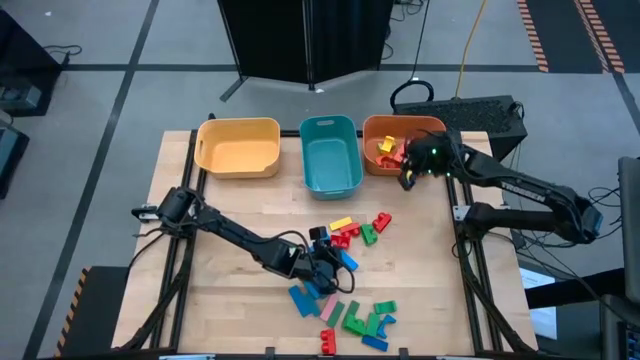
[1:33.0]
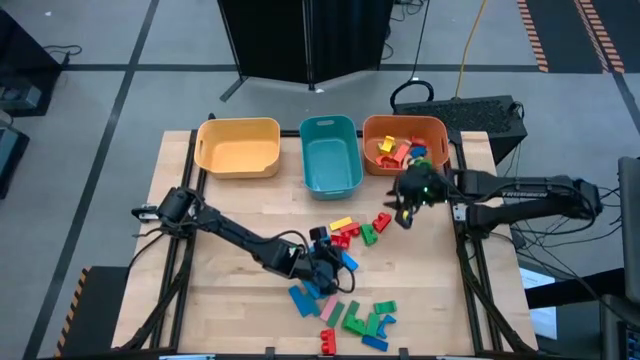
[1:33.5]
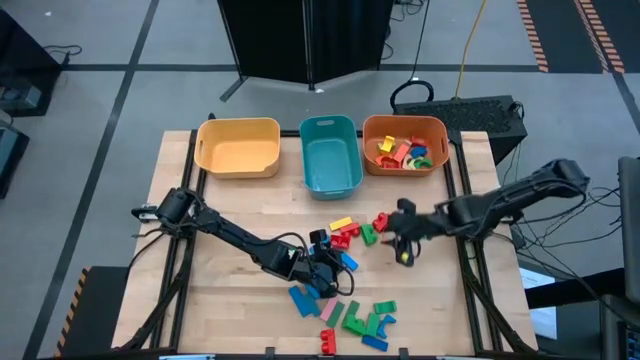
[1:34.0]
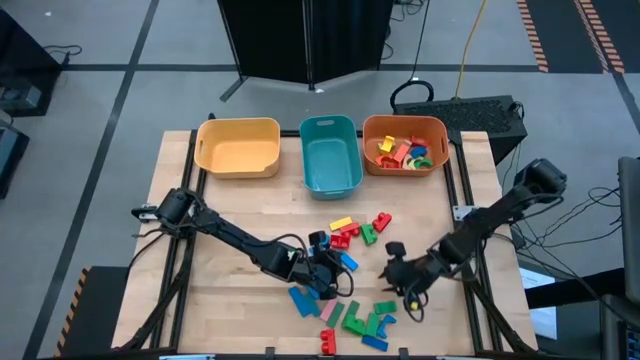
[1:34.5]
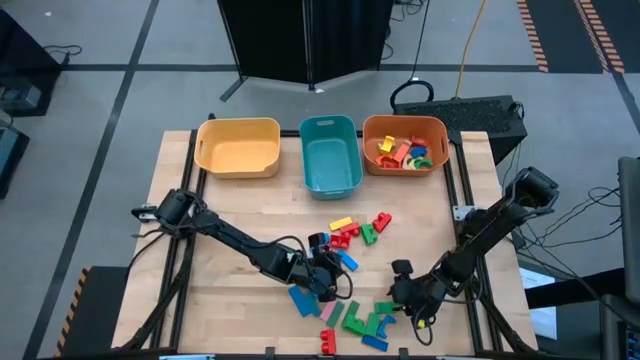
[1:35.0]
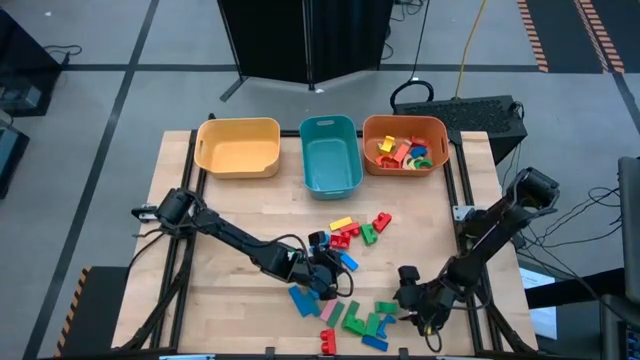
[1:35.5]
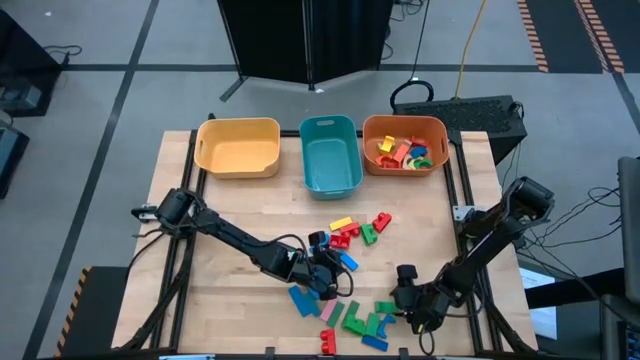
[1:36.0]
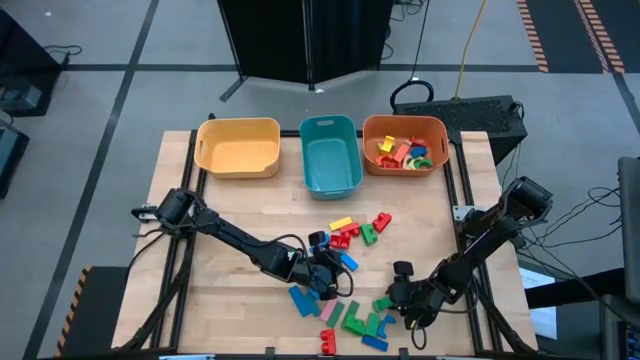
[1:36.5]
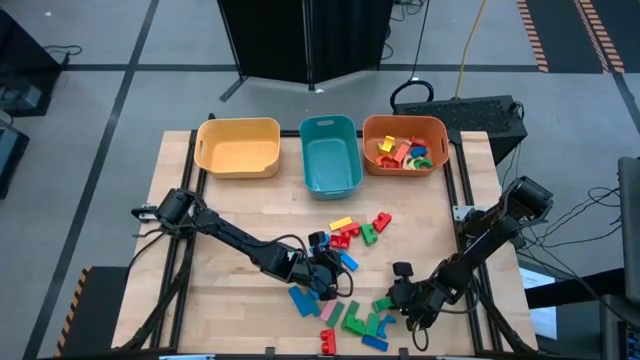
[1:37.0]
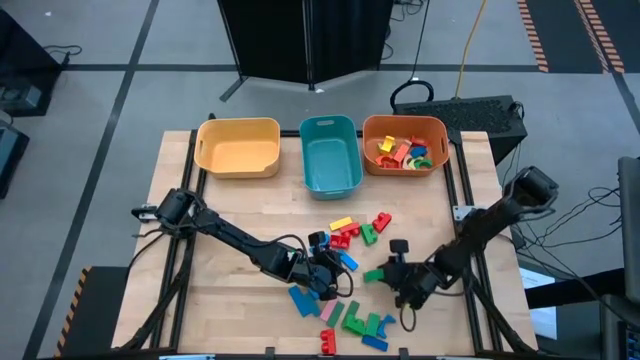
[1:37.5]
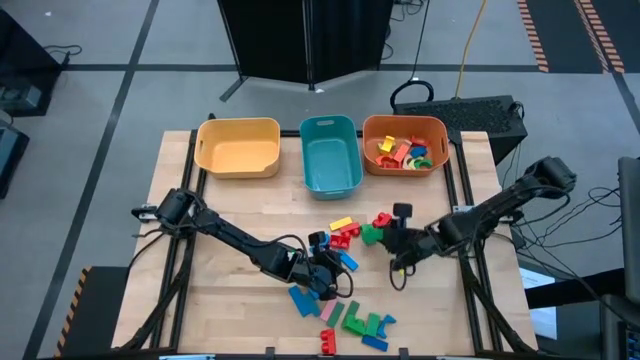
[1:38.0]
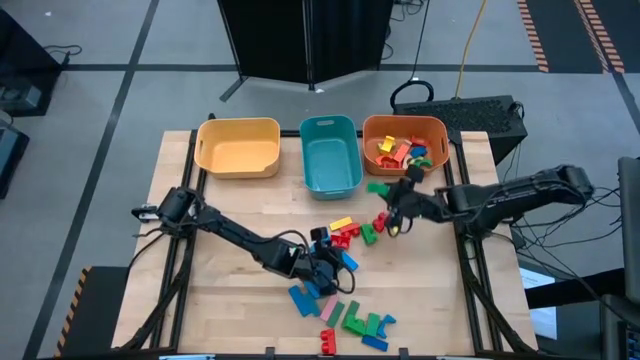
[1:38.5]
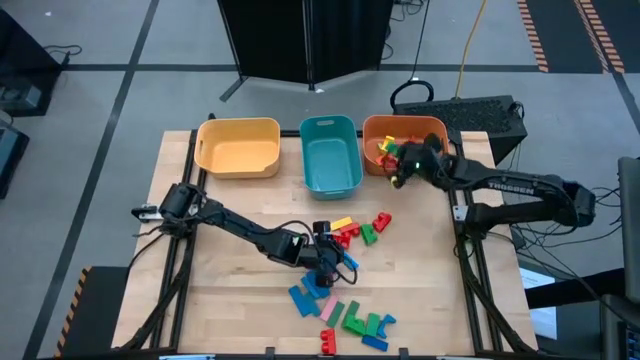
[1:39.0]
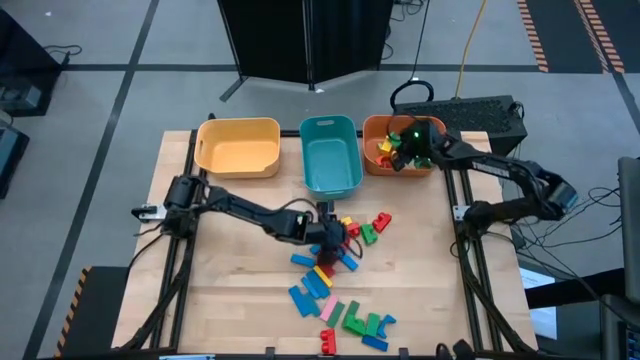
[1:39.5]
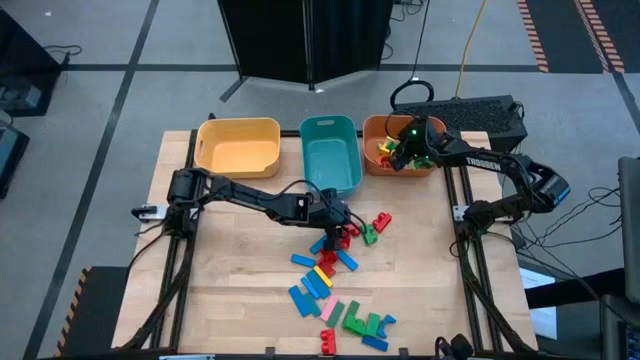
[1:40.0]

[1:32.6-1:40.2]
Task: Sort blocks by size
Put the green arch block into the orange bin

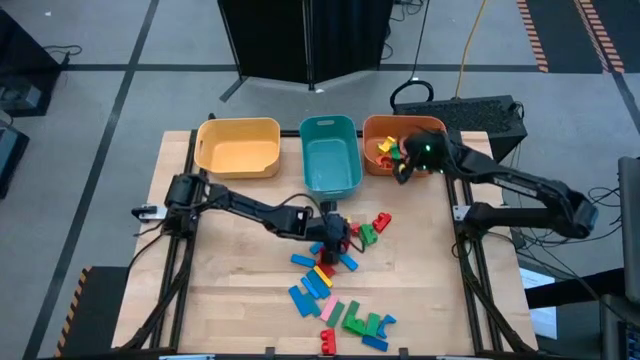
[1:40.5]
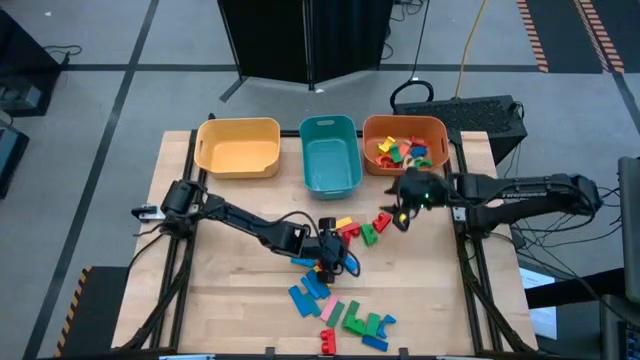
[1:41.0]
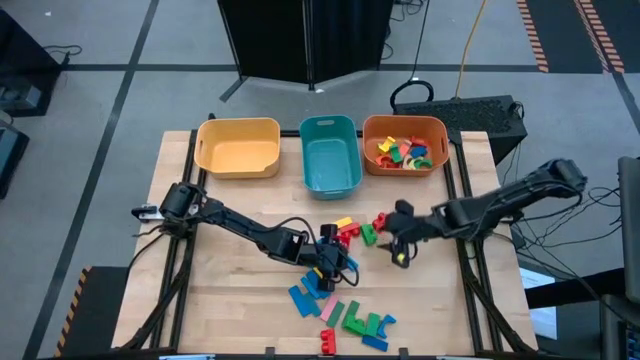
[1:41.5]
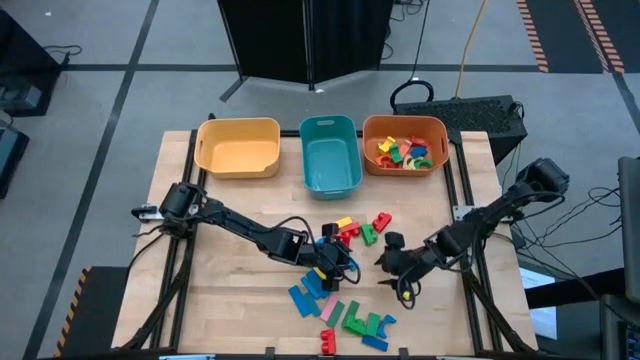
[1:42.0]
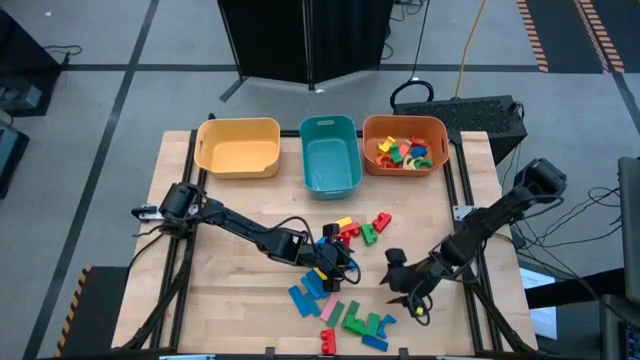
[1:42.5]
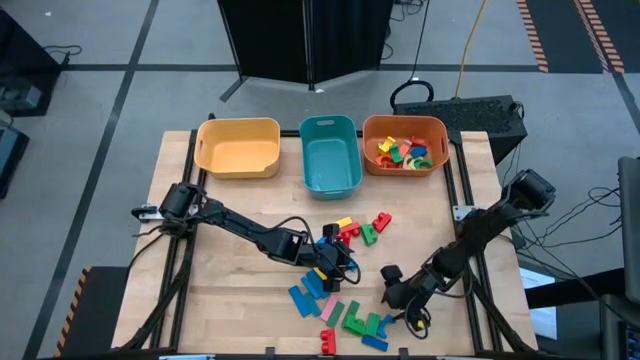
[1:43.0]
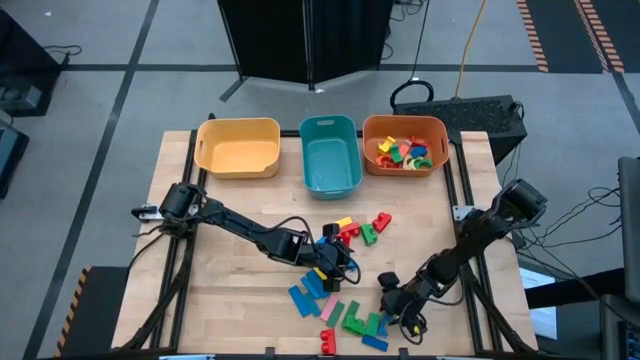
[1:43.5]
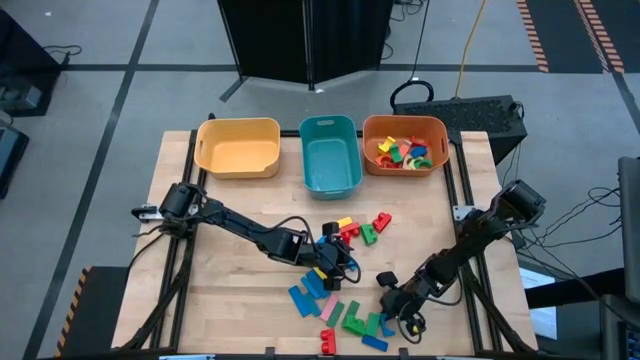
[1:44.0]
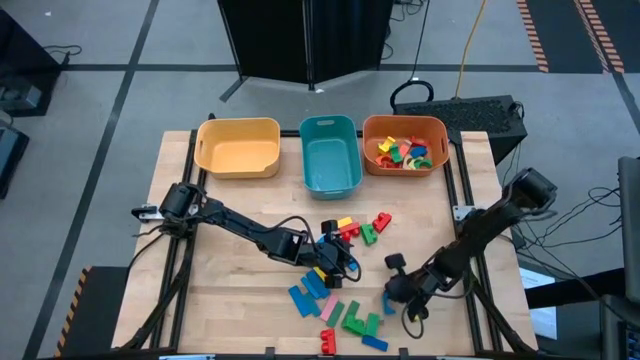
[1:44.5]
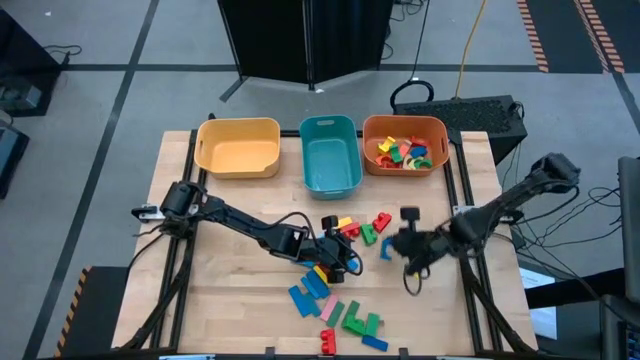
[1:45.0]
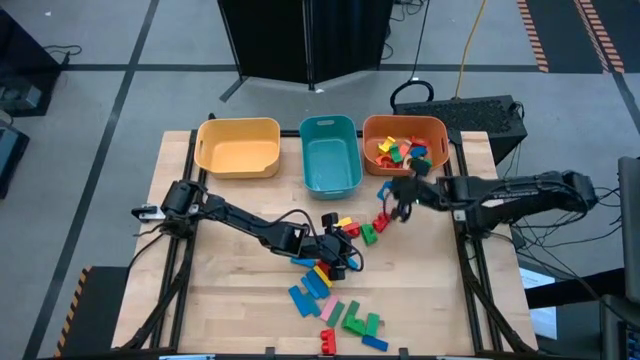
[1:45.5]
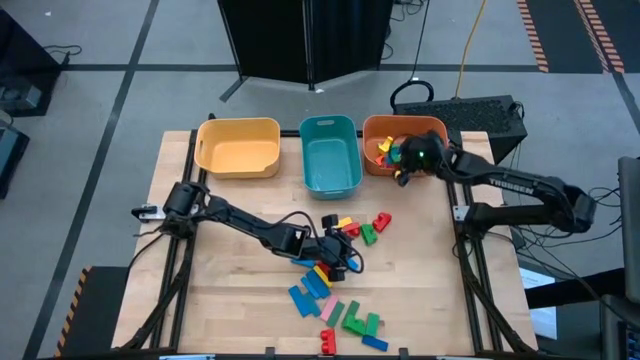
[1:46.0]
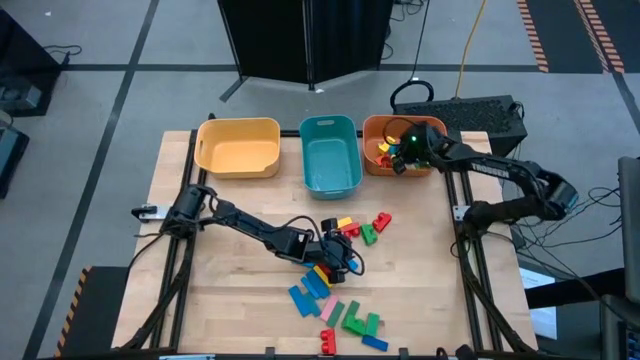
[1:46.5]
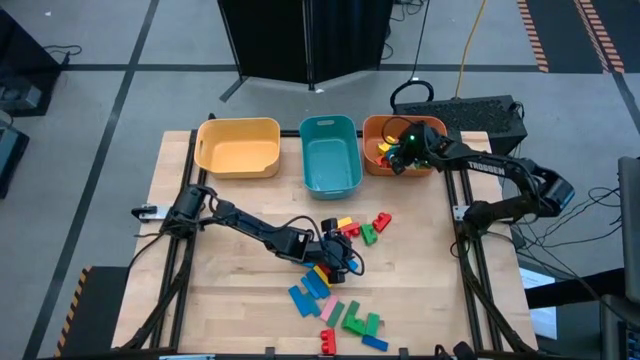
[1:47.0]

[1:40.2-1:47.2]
Put the blue arch block into the orange bin

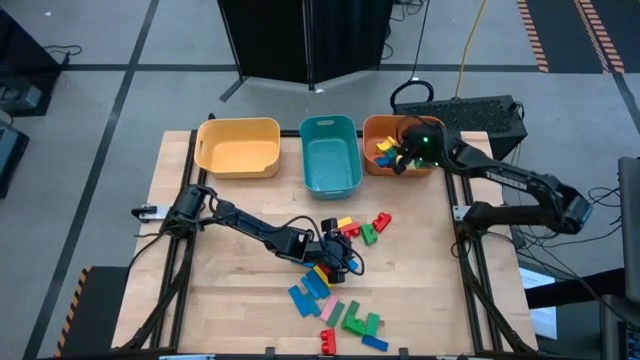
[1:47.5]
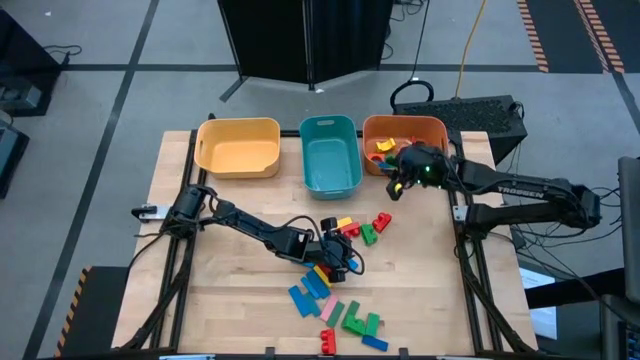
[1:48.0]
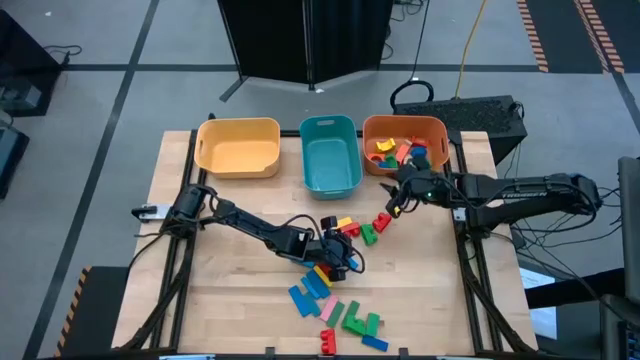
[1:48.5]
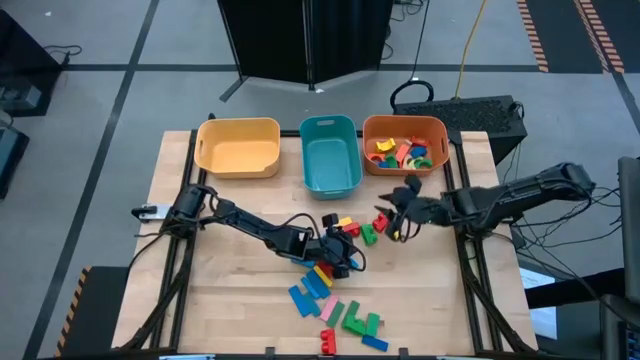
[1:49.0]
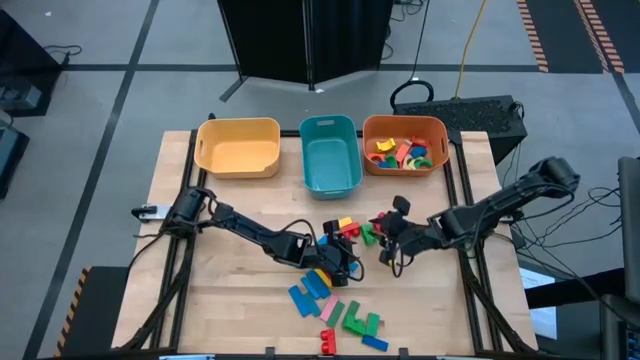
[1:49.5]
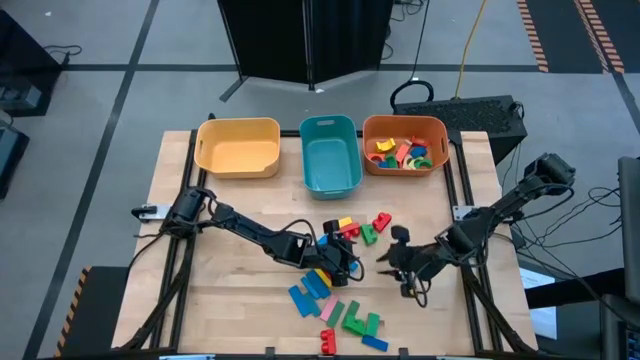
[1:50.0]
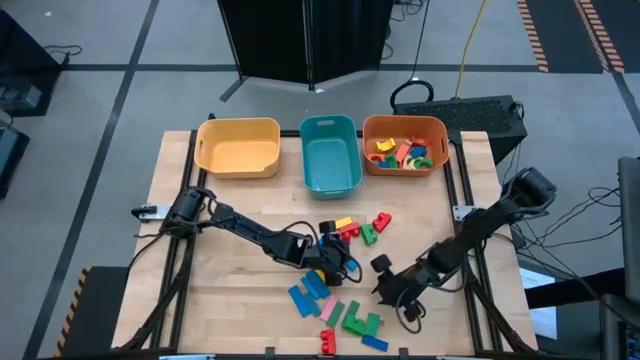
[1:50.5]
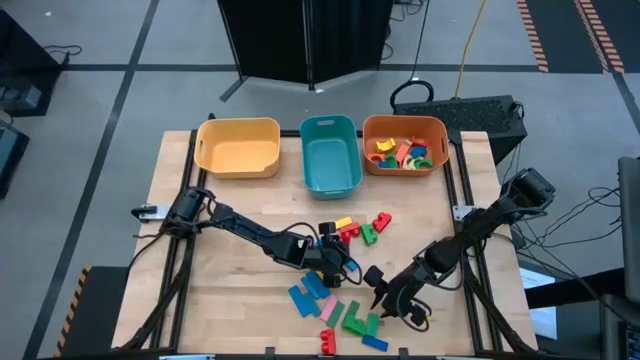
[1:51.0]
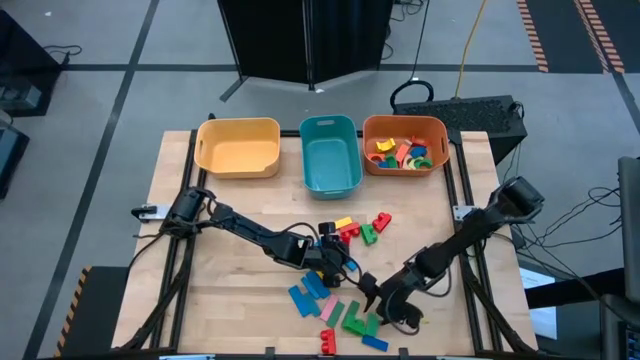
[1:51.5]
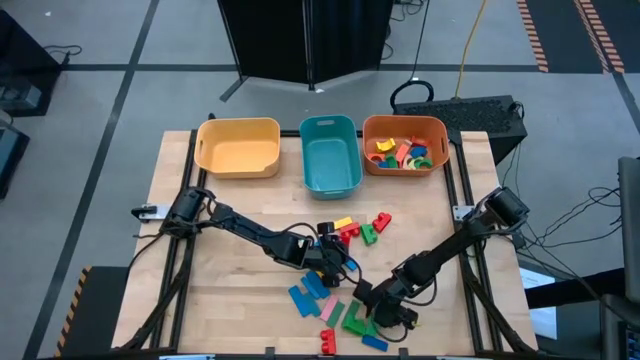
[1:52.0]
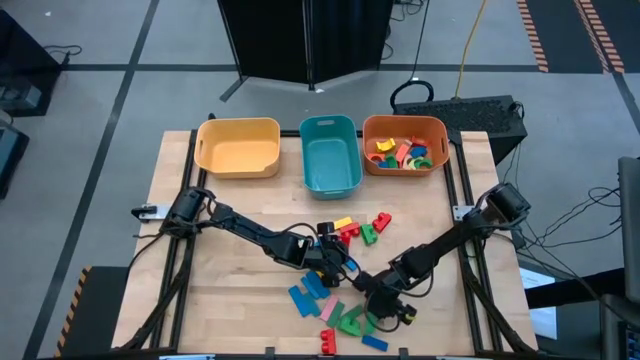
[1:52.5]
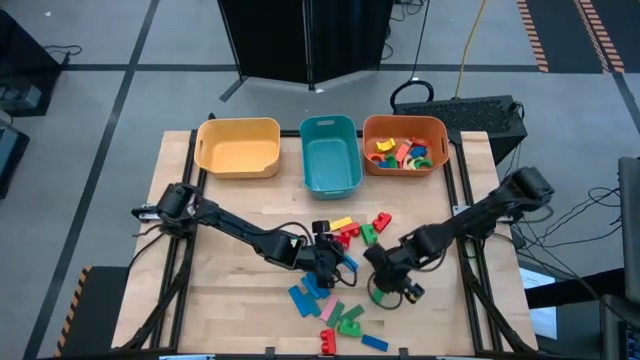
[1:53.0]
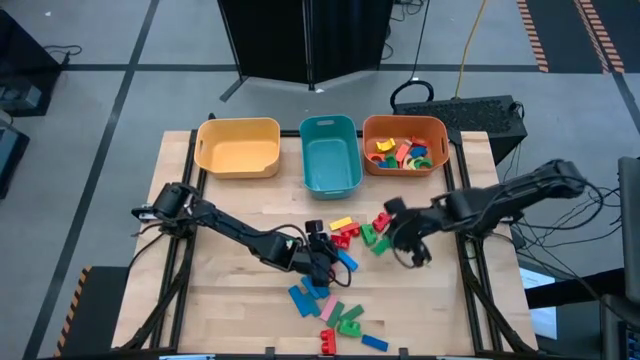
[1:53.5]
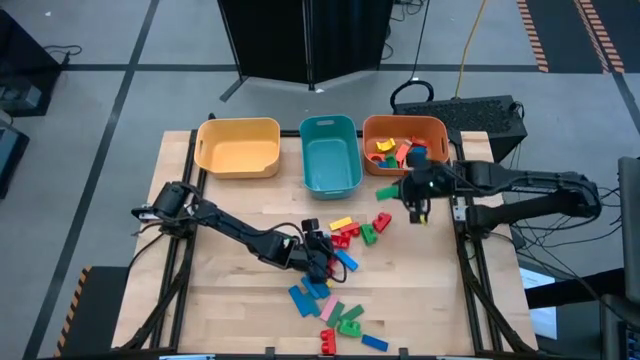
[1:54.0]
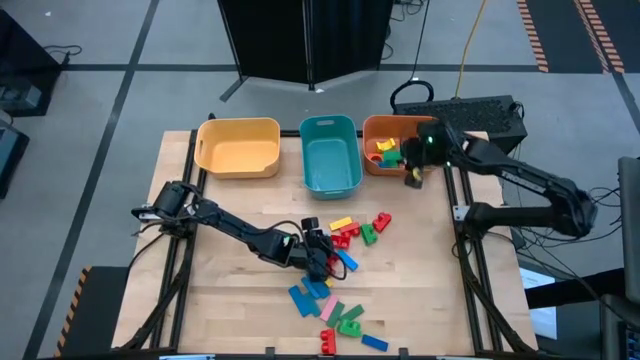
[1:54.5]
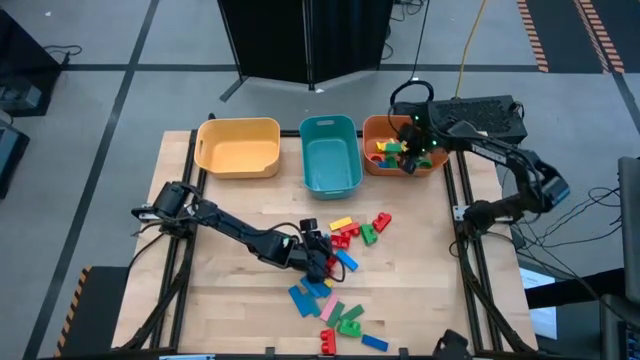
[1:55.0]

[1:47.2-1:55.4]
Put the green arch block into the orange bin
